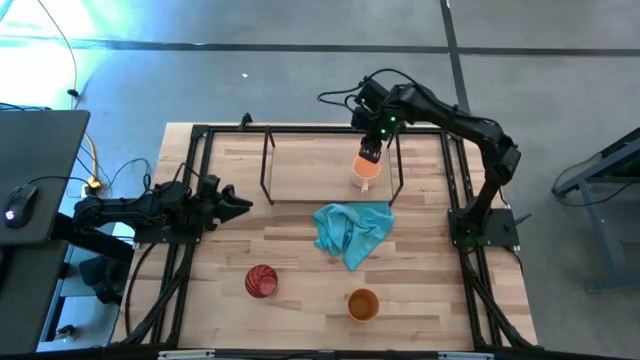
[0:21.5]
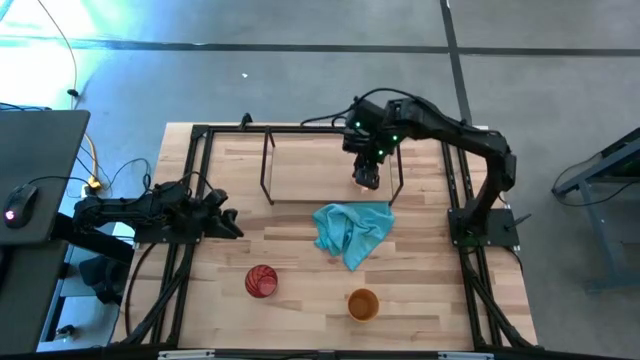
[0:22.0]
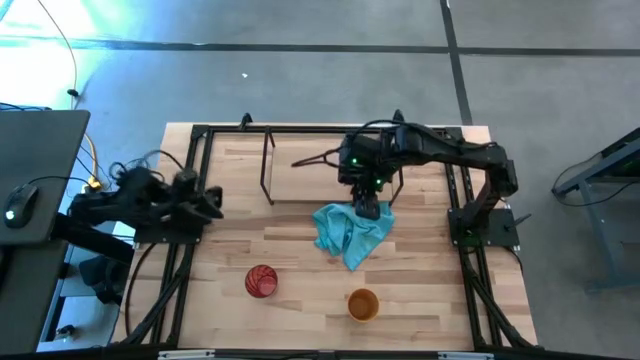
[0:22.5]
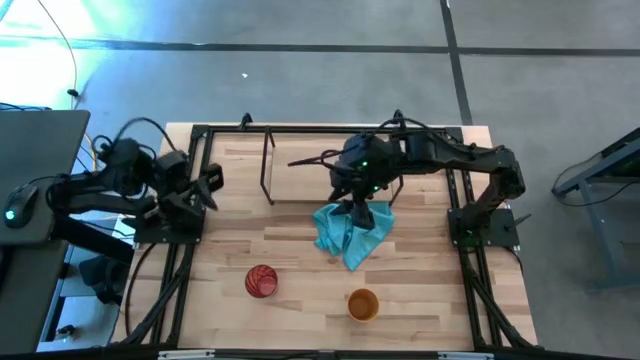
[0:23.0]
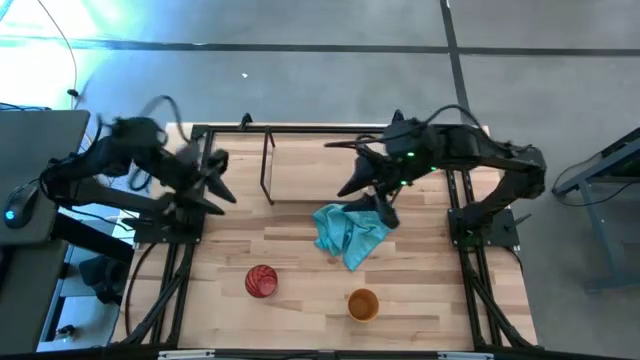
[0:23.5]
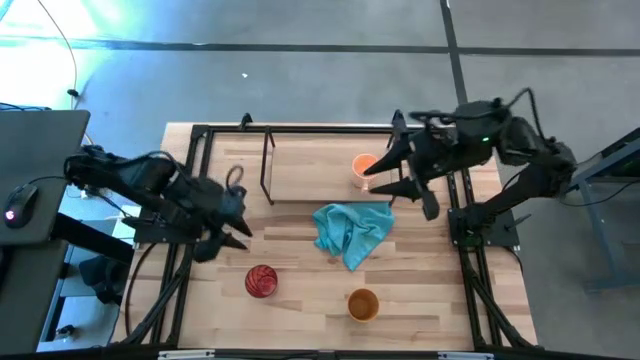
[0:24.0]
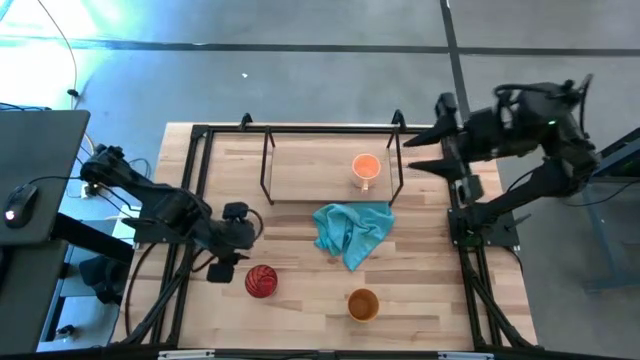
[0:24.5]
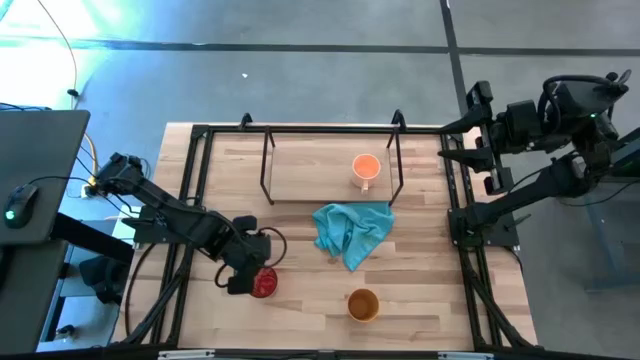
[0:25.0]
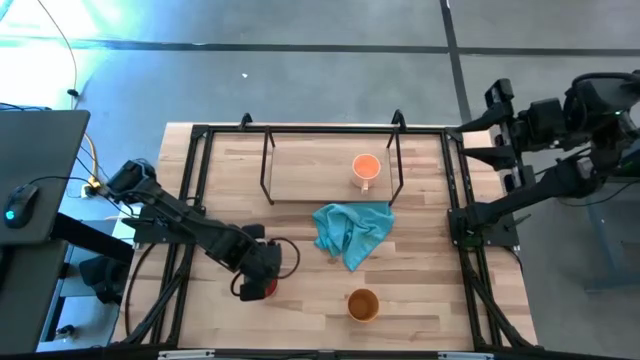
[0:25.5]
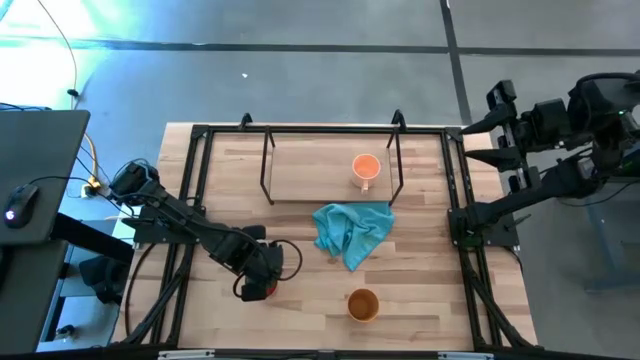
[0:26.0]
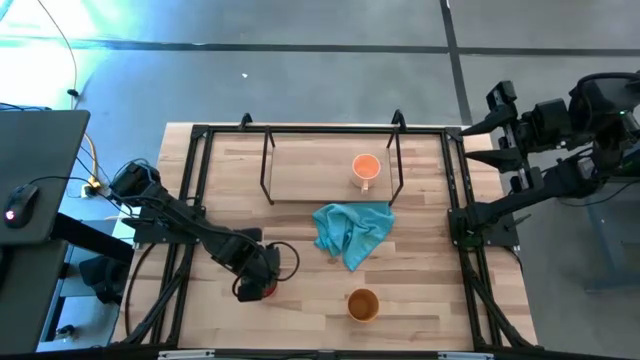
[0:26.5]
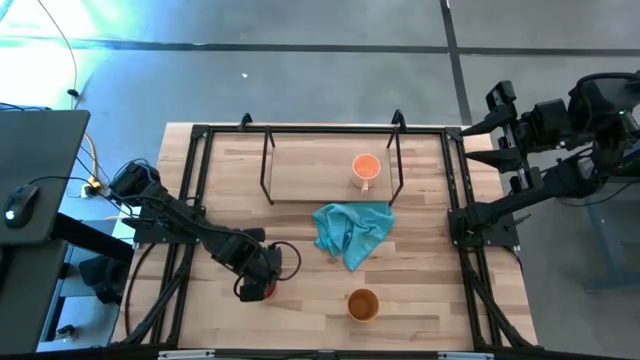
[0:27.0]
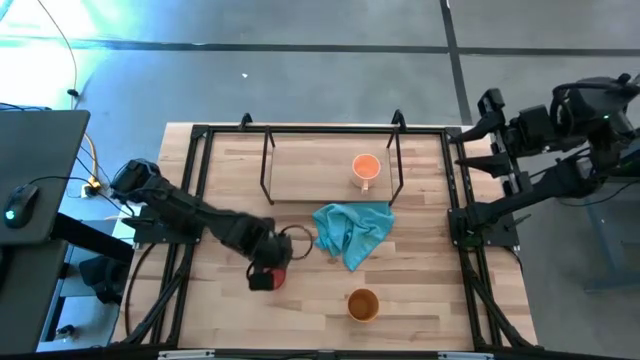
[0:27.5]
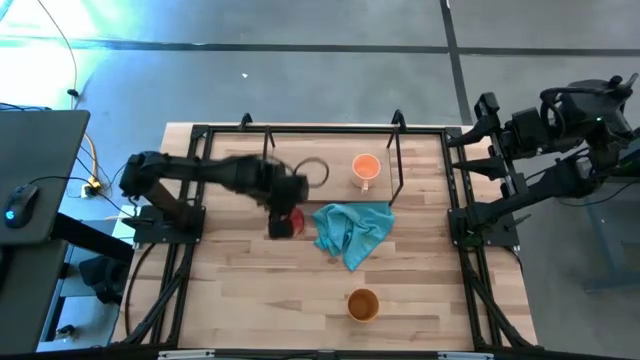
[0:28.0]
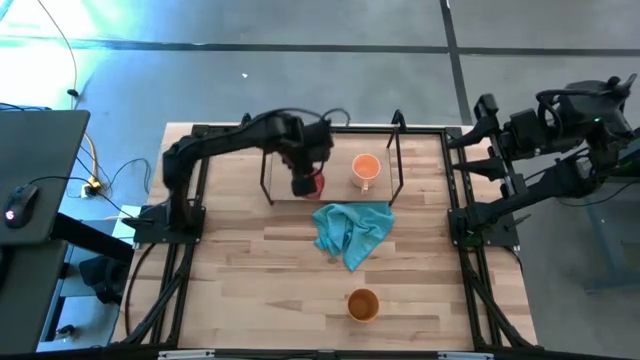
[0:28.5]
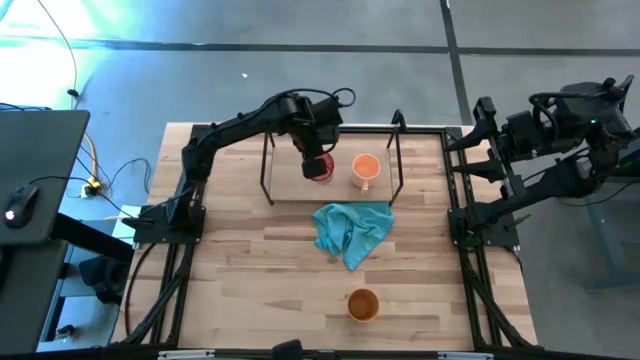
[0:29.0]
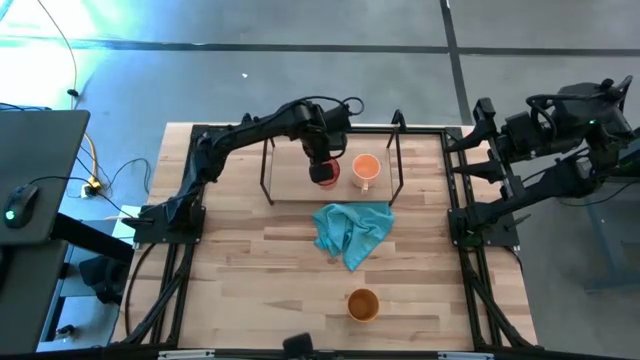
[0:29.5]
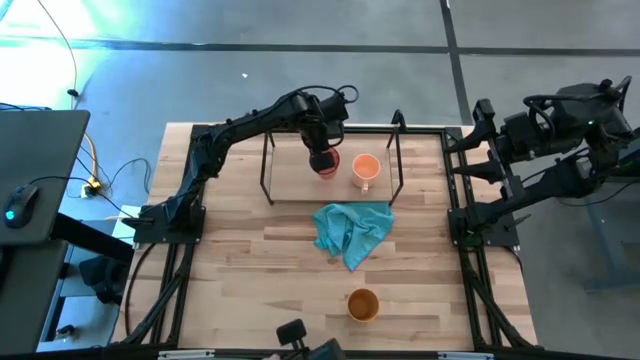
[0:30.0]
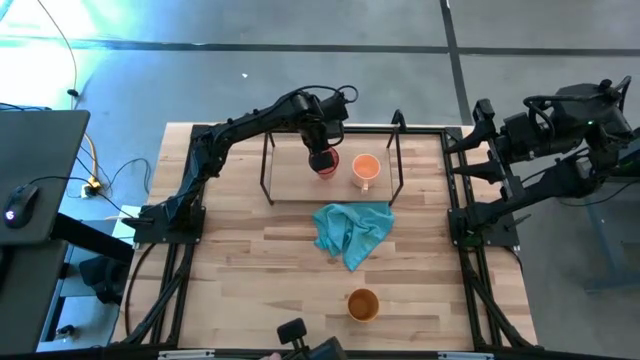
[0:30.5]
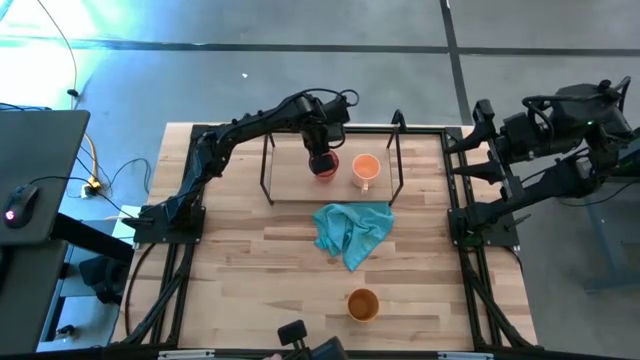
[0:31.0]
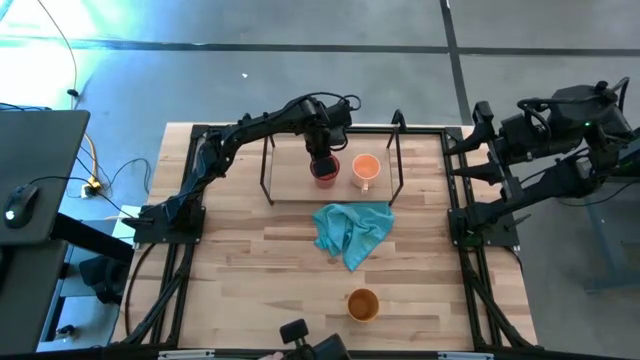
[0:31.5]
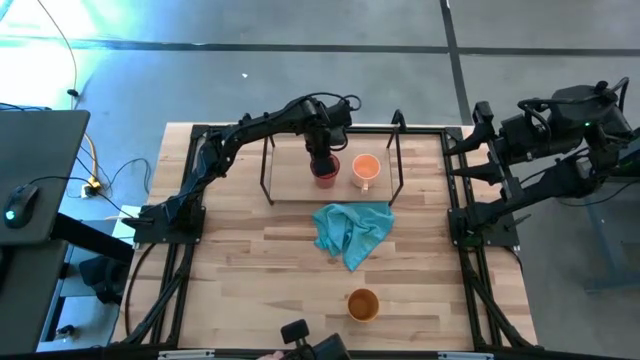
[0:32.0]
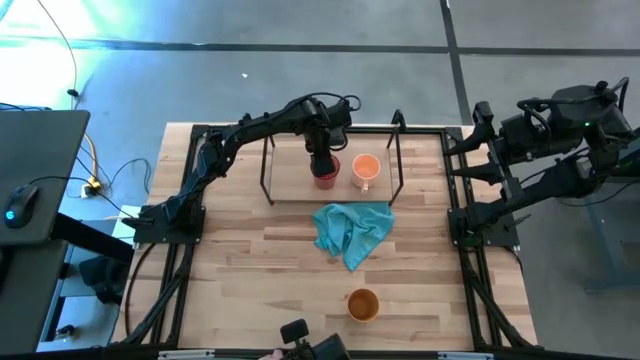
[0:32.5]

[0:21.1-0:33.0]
Task: Stack small to large cups/mugs on shelf
Put the red cup on the shelf

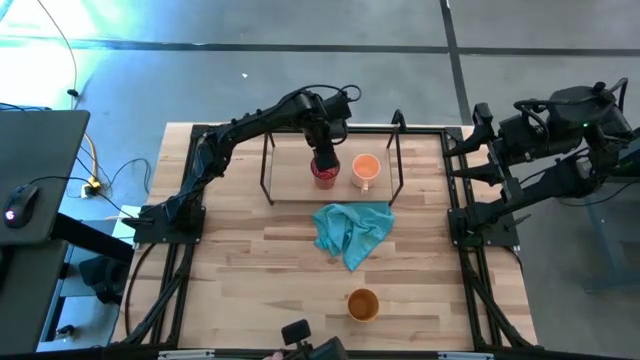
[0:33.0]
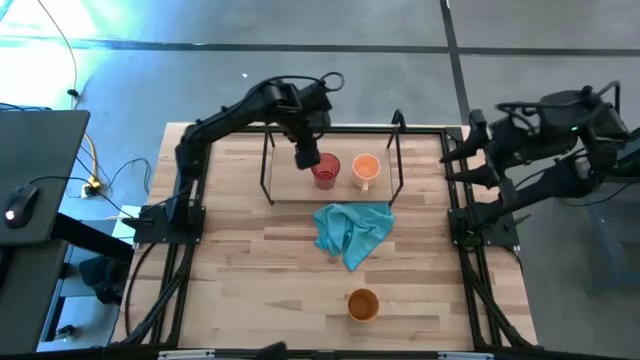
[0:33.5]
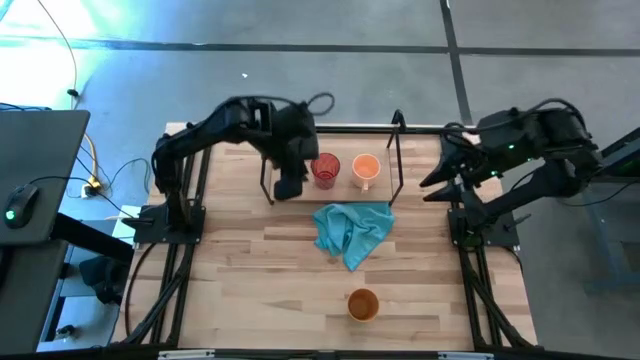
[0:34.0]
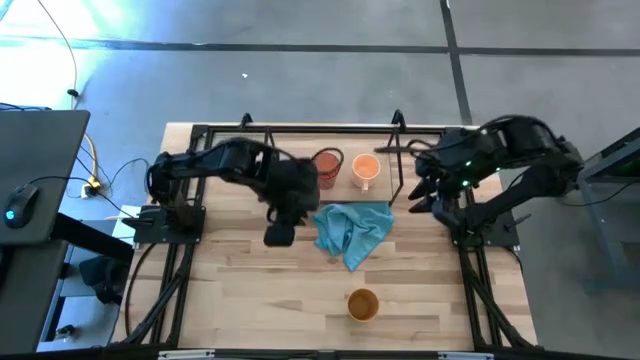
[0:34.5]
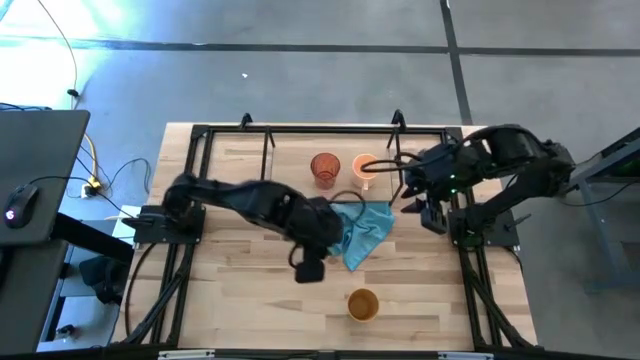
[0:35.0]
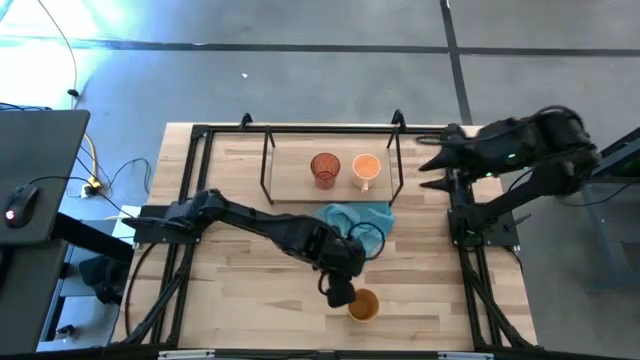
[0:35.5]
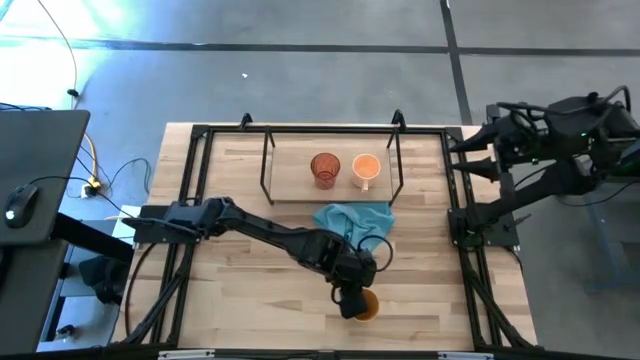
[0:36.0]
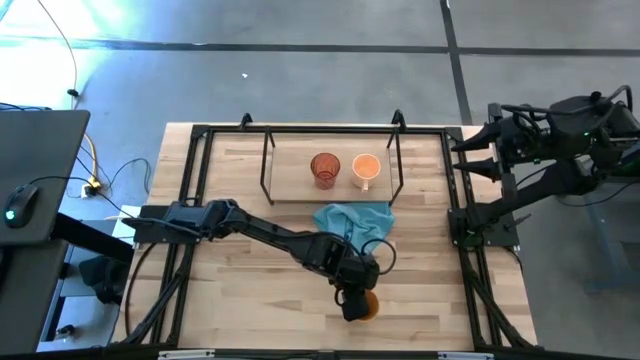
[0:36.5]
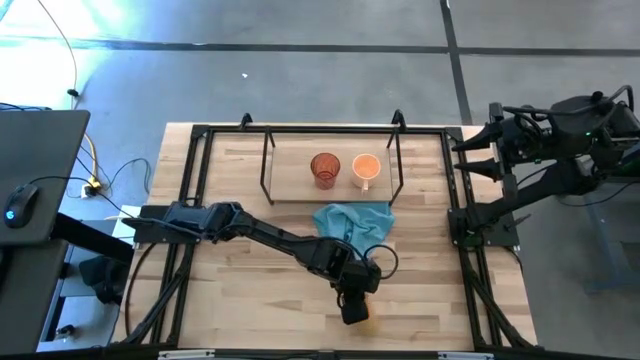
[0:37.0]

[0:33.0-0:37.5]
Put the yellow cup on the shelf

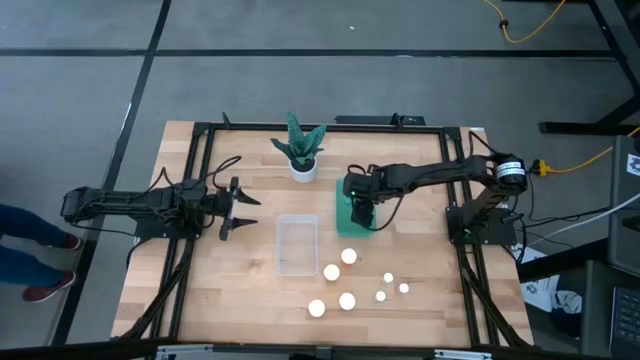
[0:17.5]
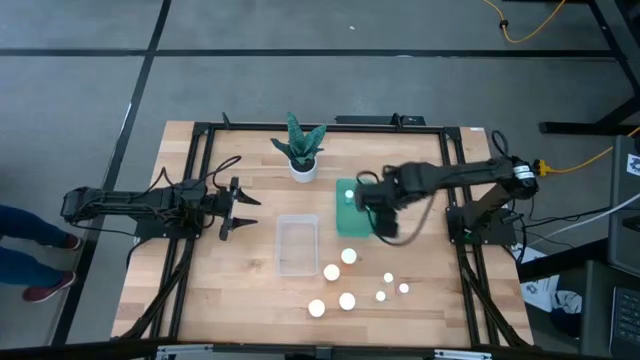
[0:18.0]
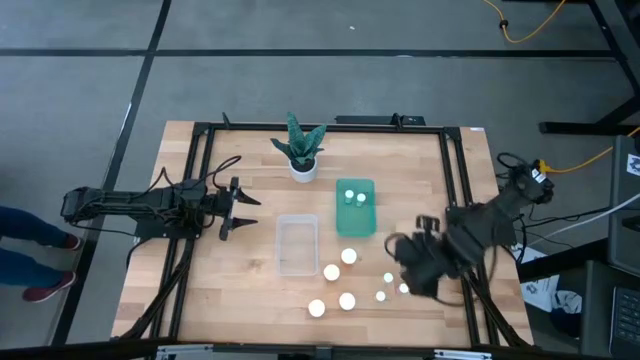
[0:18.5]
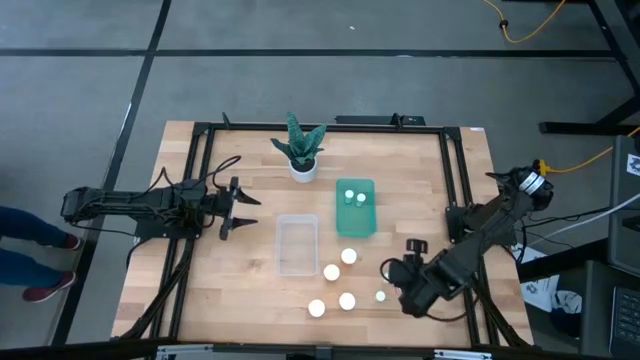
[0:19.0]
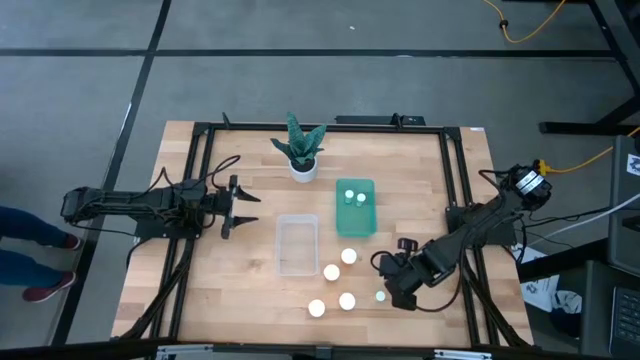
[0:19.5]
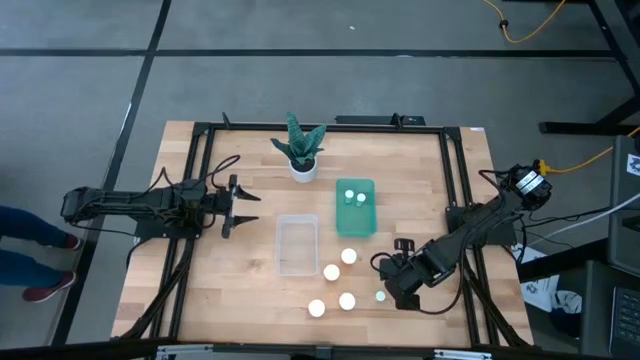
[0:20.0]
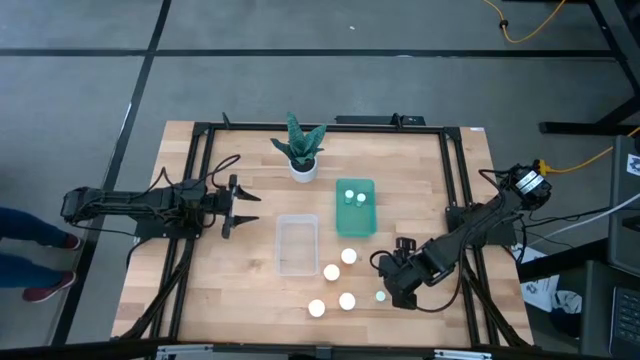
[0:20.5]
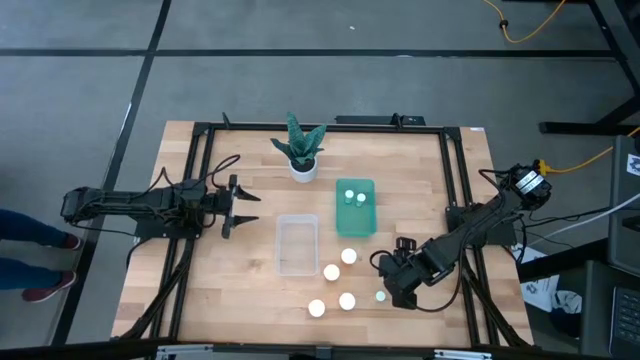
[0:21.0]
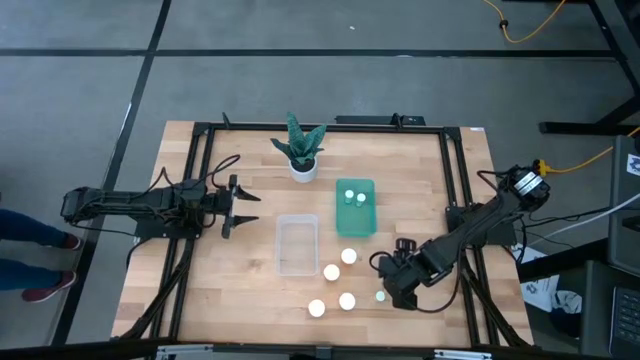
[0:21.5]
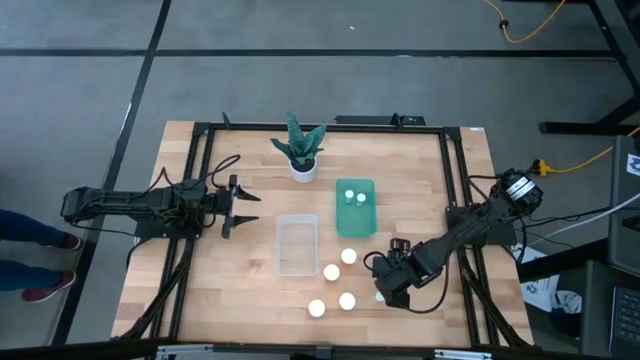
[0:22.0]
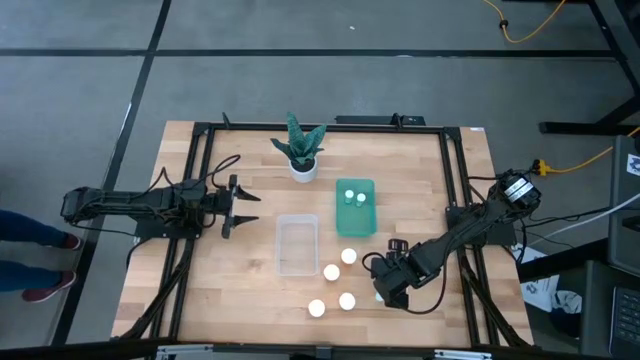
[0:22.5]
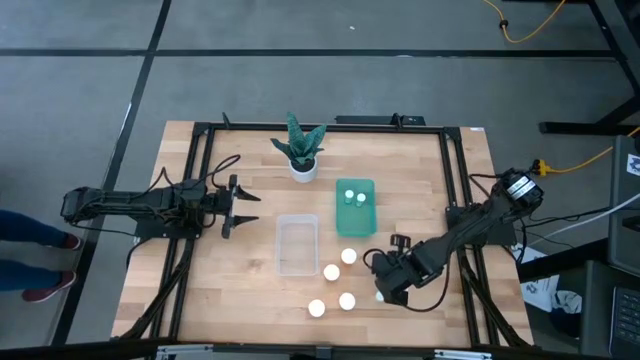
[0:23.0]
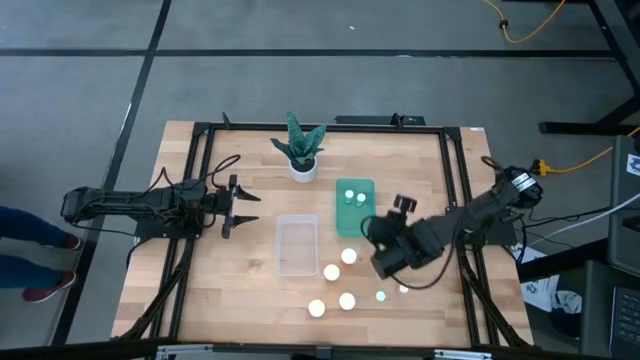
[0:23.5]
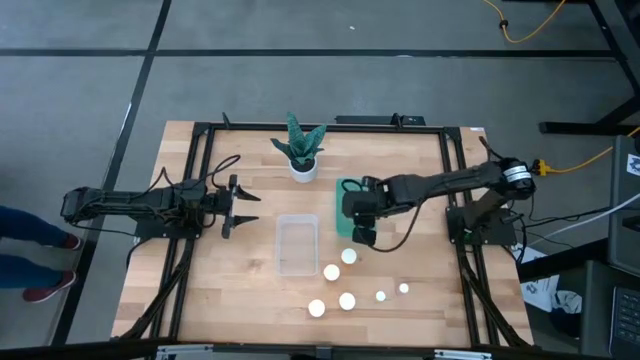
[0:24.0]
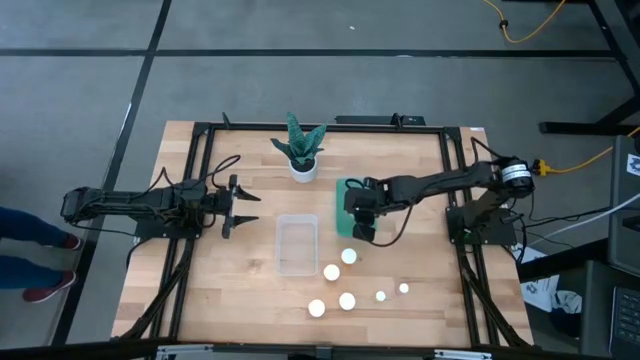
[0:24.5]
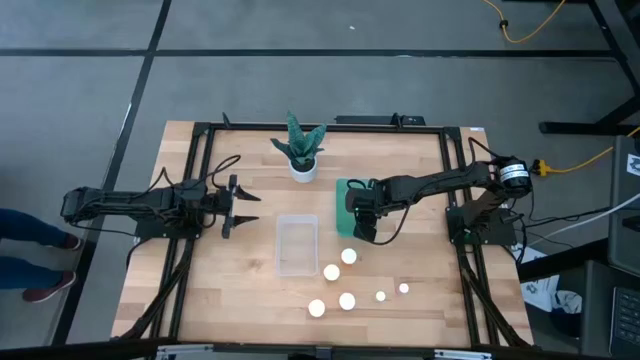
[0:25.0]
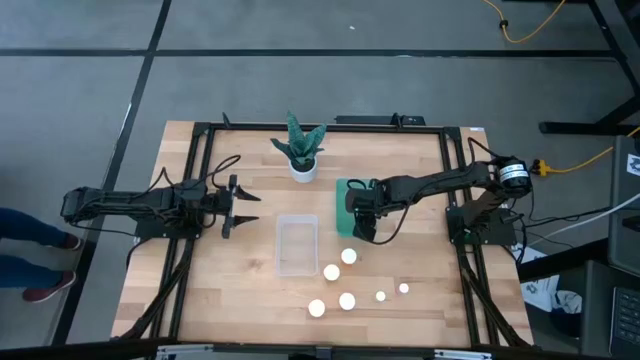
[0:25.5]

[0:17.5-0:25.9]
Task: Pick and place medicine bottles into bin by pill shape (circle, oval)
Put the small yellow pill bottle into the green bin
